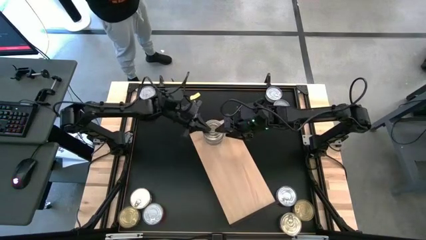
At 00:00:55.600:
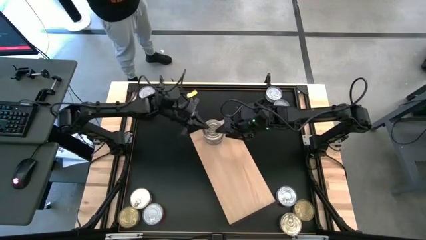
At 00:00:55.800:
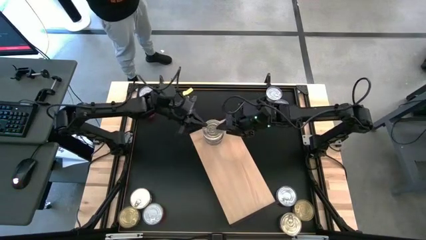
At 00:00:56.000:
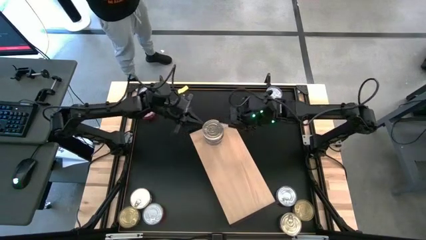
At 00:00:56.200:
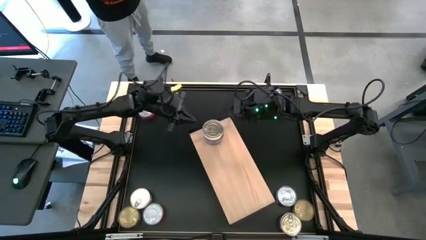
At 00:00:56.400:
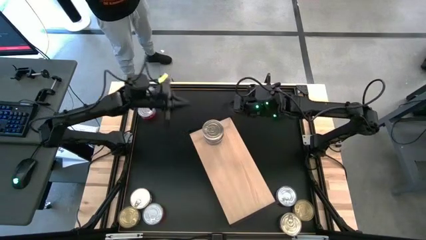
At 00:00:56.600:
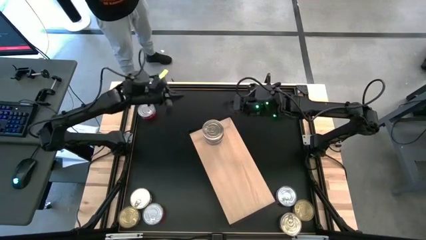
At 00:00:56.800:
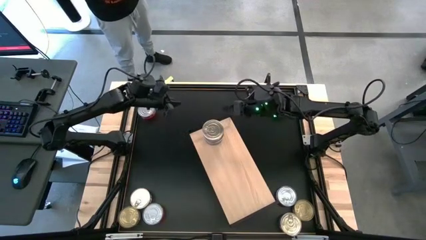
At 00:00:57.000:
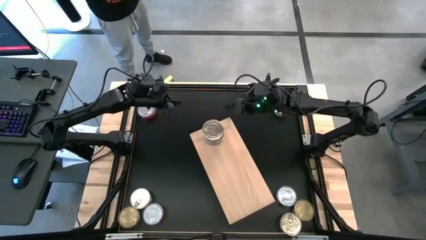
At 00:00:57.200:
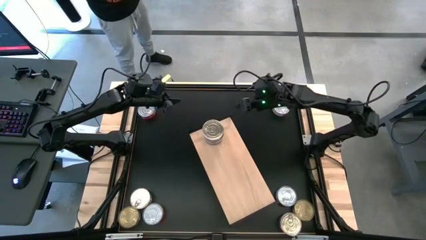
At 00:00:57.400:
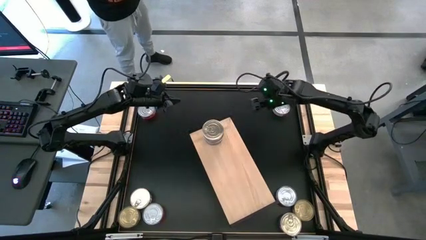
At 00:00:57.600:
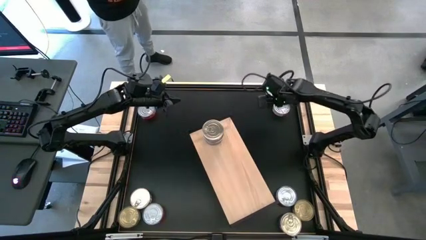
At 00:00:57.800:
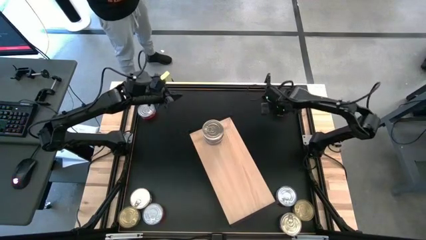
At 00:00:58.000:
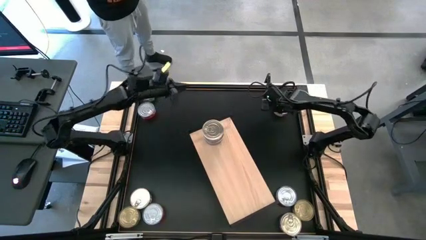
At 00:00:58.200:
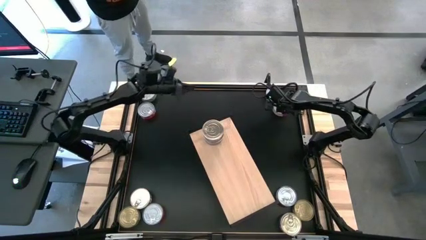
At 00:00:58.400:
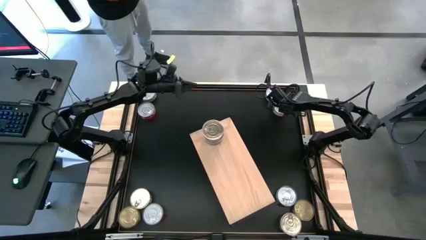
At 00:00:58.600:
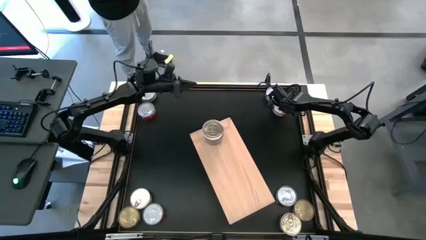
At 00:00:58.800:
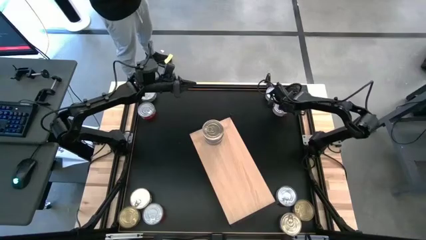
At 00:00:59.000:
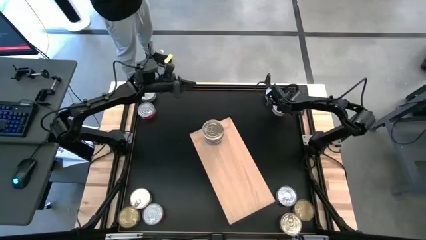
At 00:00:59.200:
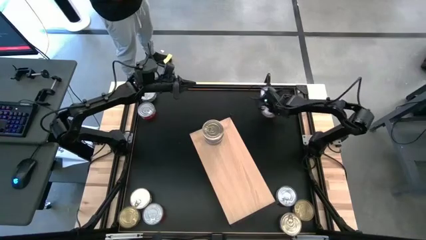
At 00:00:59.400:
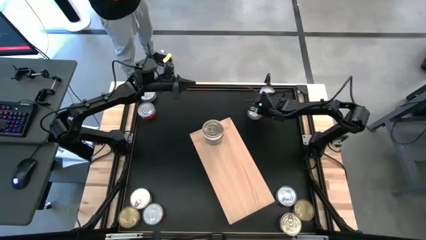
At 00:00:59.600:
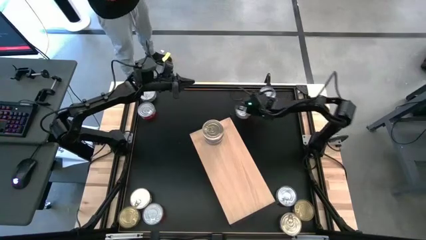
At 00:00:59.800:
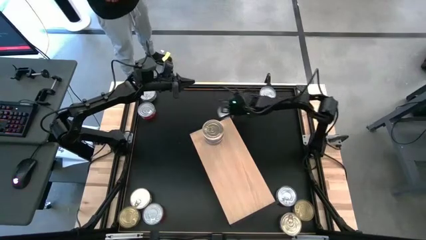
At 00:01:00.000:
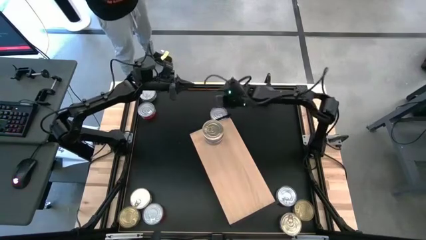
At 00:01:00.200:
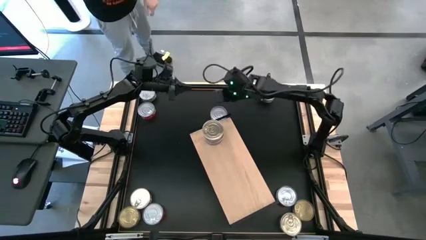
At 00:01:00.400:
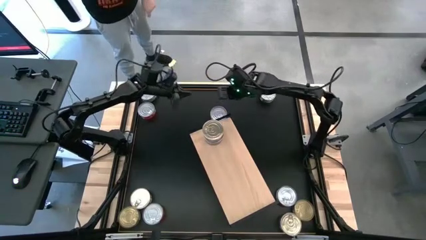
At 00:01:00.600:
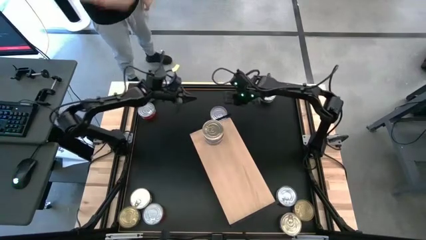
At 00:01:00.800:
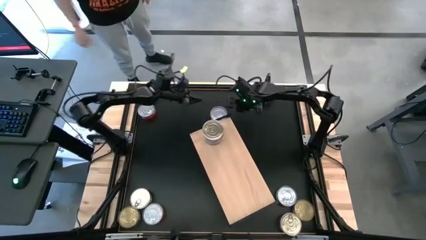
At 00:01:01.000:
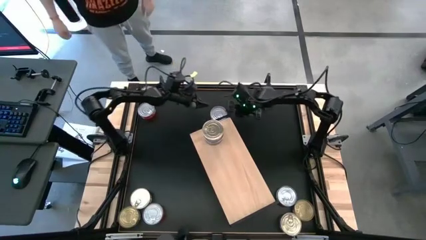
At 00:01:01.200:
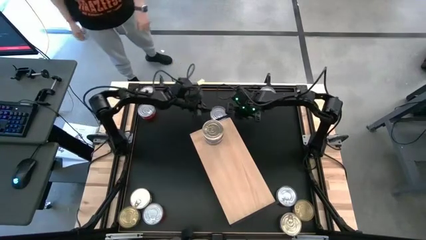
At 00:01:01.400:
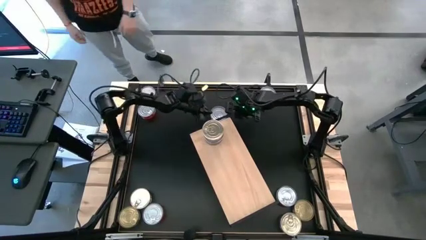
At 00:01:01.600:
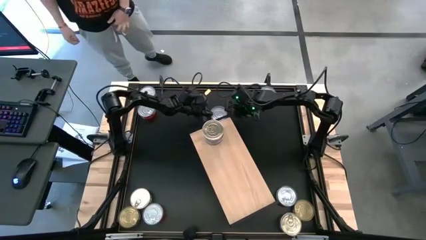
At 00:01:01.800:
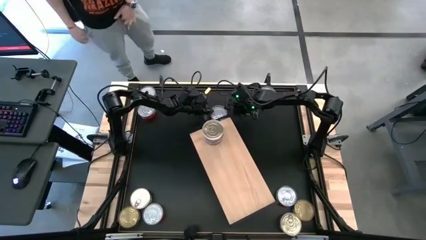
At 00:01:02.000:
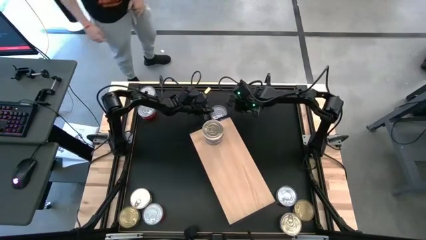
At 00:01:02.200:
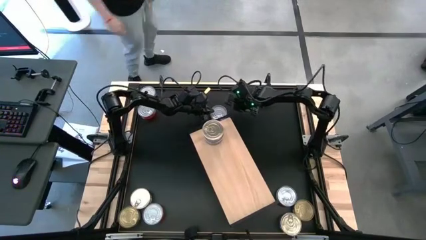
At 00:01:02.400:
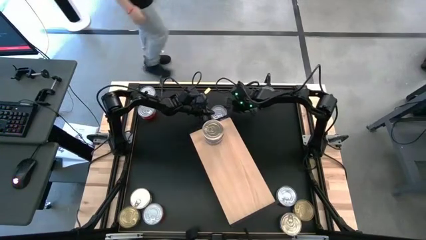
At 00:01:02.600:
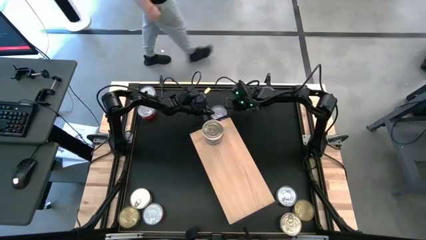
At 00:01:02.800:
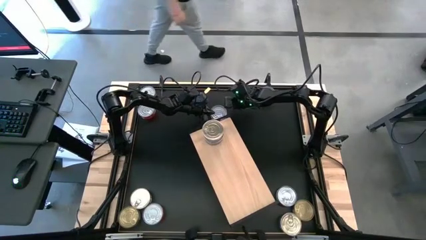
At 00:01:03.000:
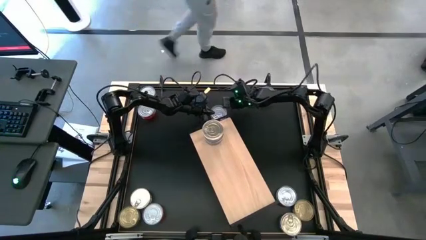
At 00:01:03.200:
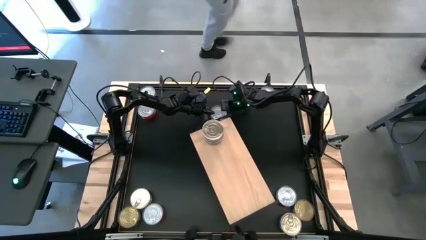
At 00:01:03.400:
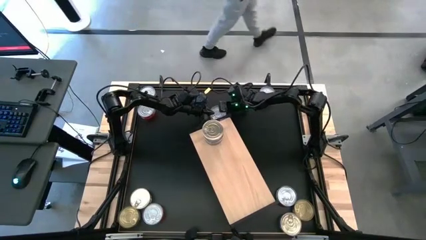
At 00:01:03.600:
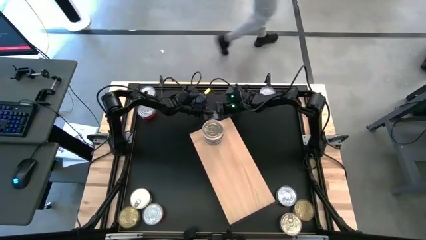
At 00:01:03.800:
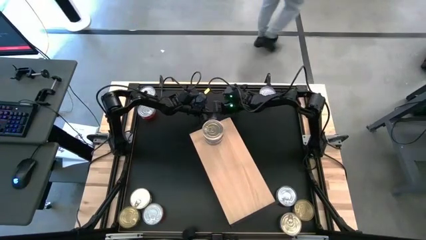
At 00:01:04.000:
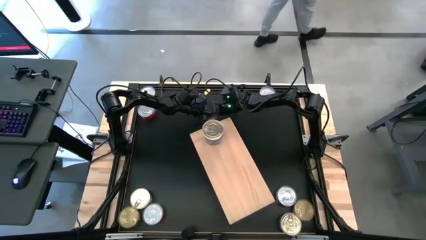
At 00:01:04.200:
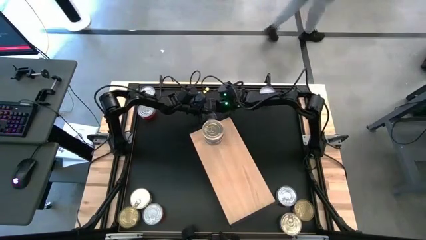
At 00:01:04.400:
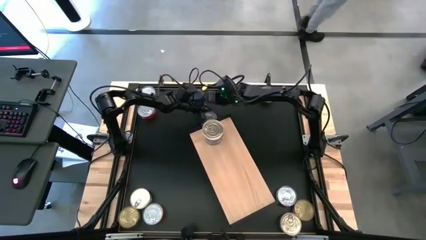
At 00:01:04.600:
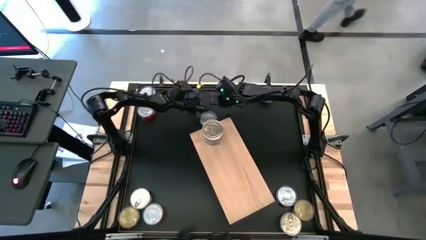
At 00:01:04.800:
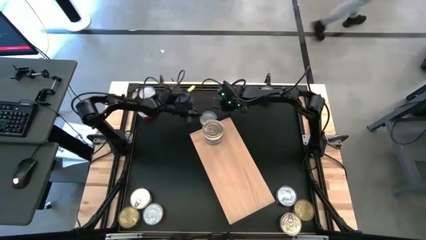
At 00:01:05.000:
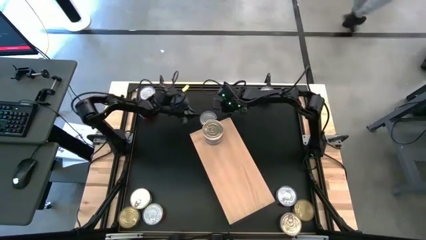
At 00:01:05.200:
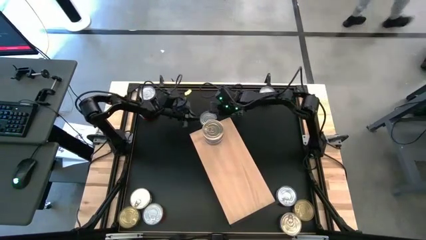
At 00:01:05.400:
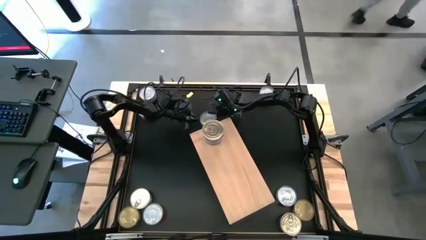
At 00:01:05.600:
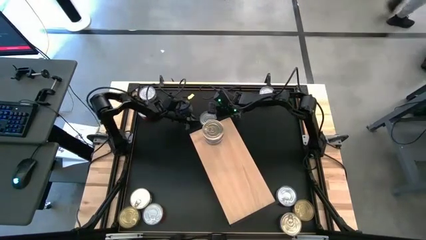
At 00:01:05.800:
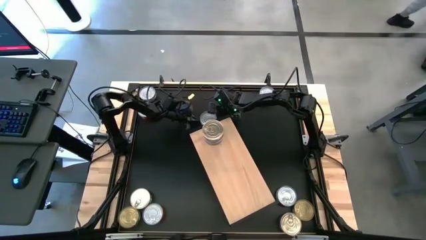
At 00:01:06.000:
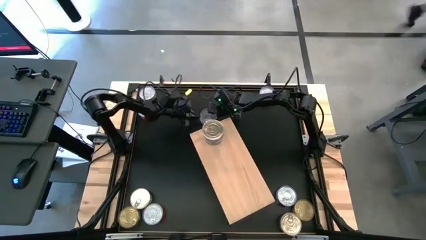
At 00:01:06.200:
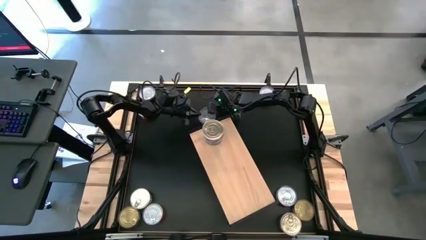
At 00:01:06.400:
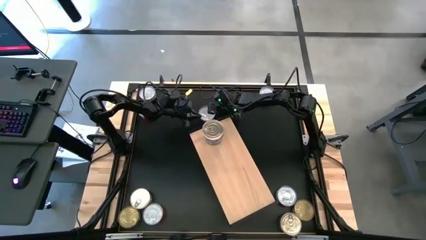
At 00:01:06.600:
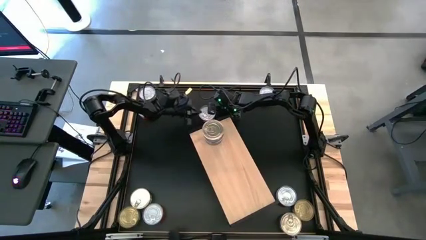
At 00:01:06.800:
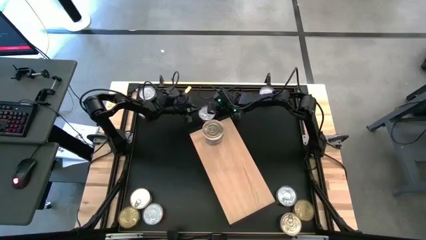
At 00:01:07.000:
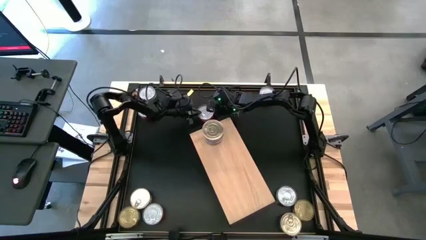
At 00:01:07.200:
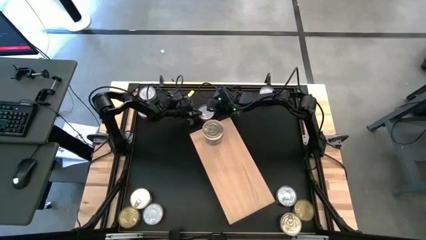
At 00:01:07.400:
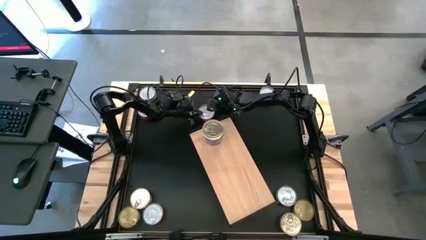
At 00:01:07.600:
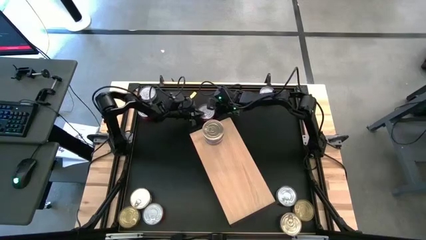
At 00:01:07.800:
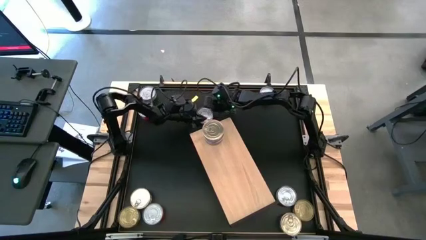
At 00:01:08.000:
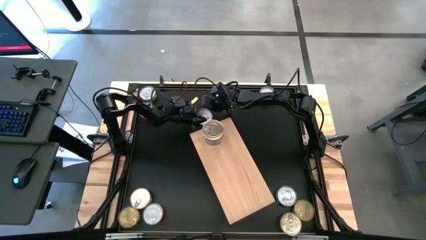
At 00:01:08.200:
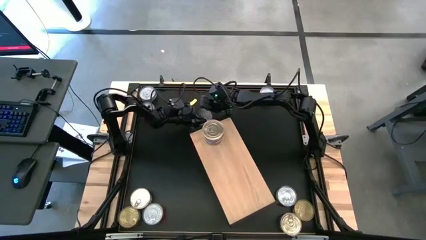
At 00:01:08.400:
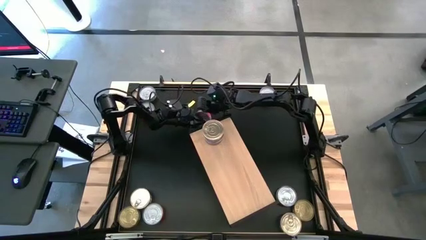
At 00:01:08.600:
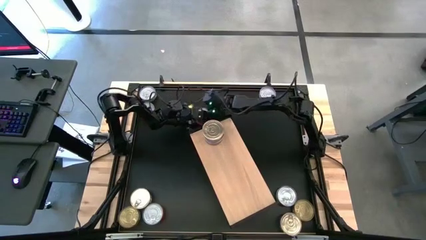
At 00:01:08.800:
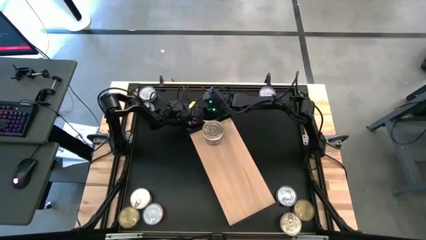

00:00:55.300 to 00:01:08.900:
Task: Stack canned seafood by type on shelf
Put the red tuna can on the shelf
